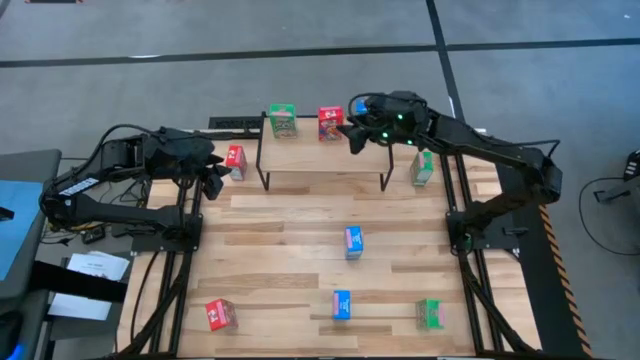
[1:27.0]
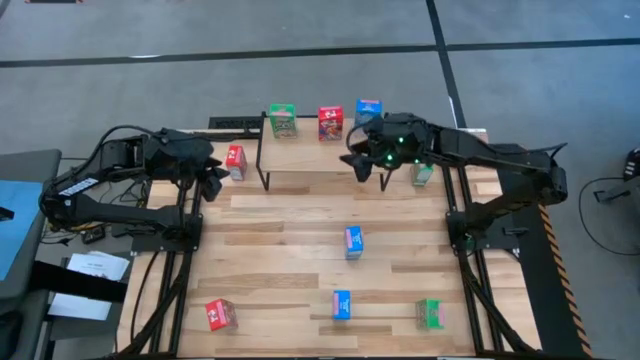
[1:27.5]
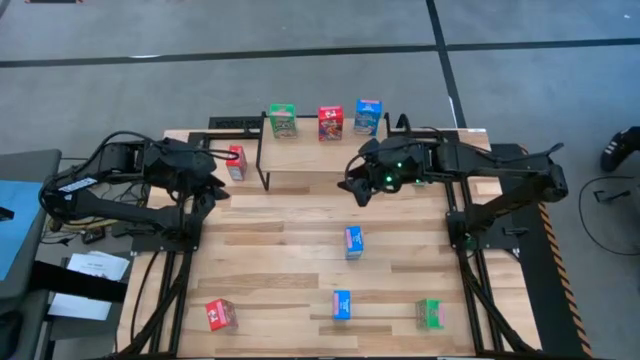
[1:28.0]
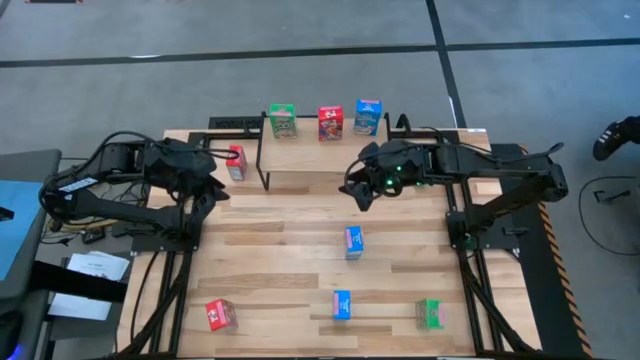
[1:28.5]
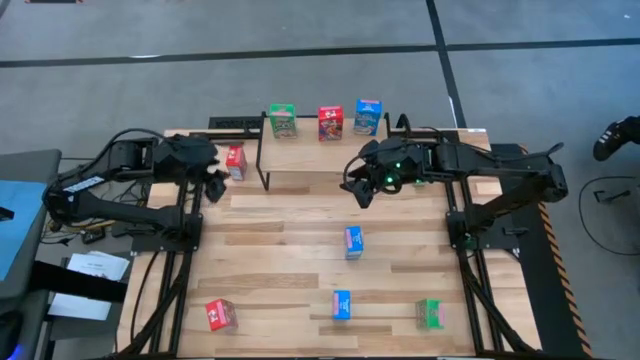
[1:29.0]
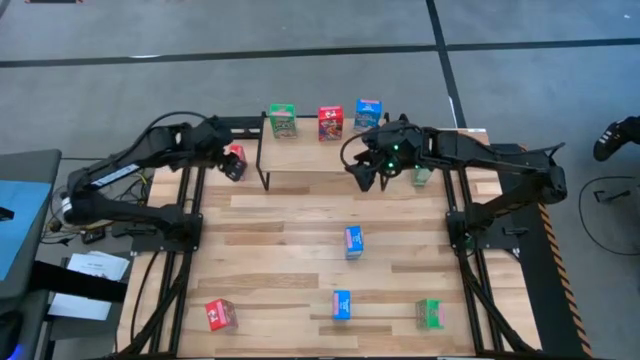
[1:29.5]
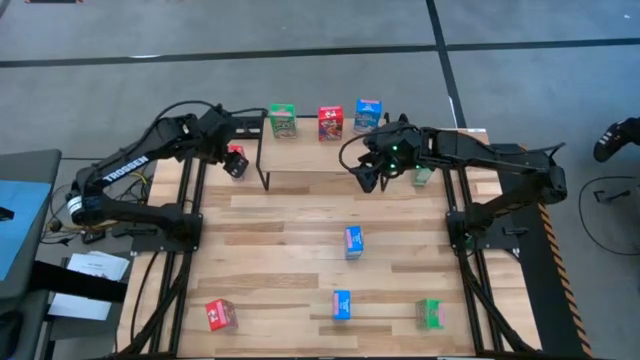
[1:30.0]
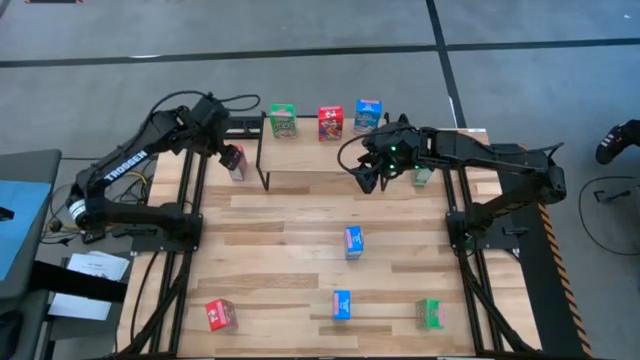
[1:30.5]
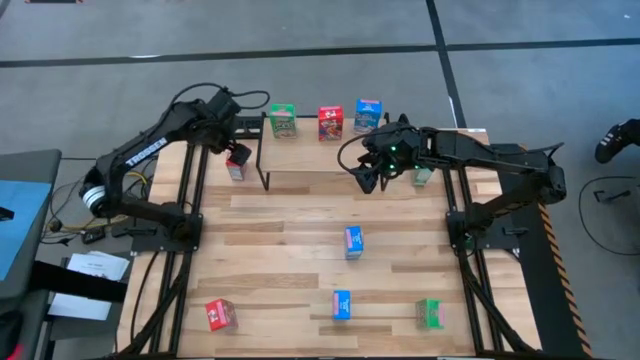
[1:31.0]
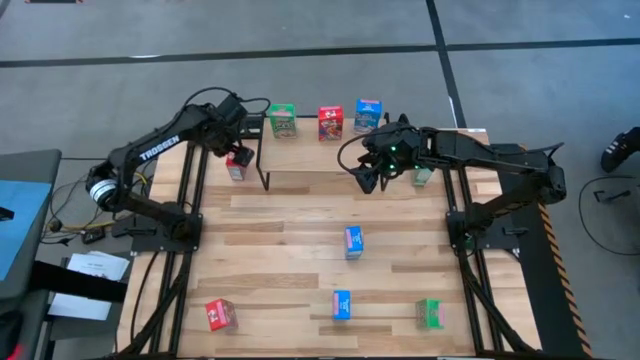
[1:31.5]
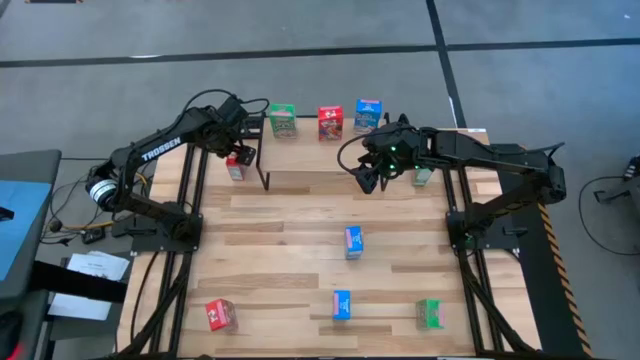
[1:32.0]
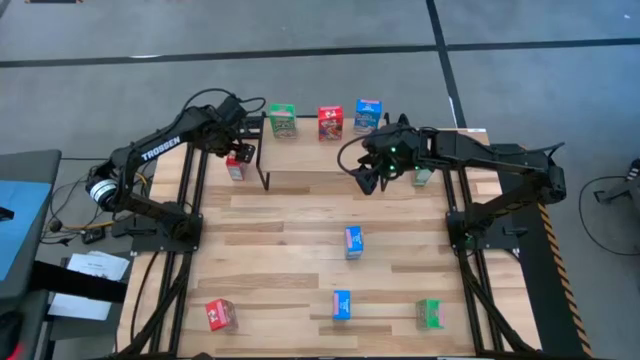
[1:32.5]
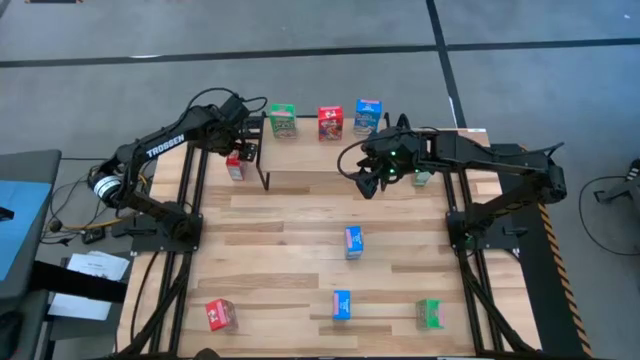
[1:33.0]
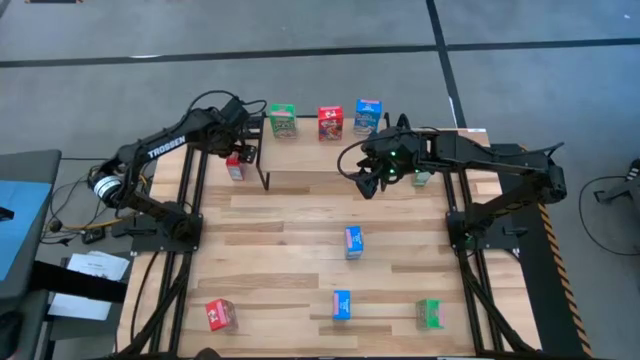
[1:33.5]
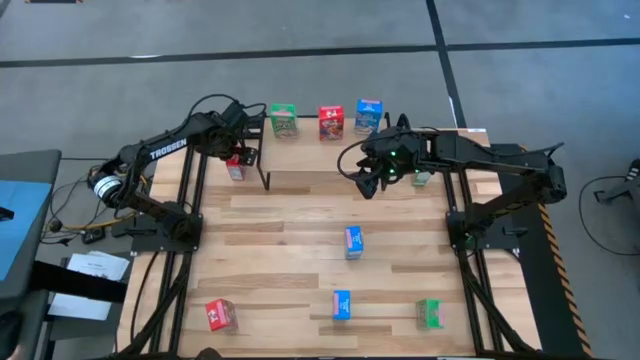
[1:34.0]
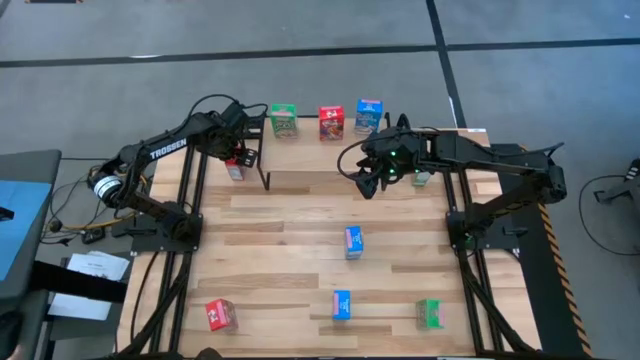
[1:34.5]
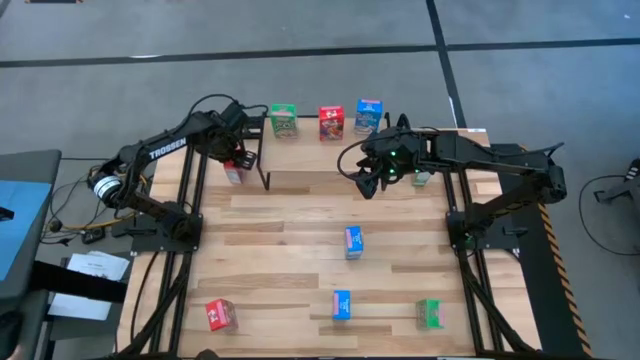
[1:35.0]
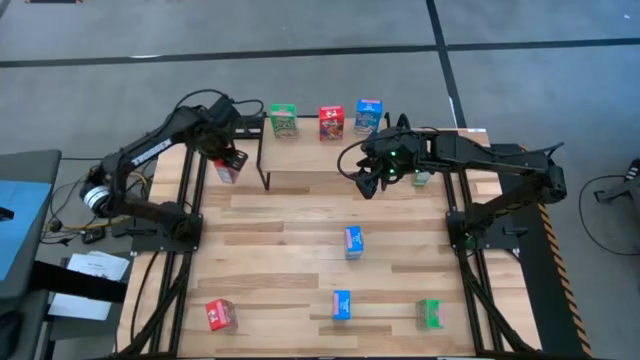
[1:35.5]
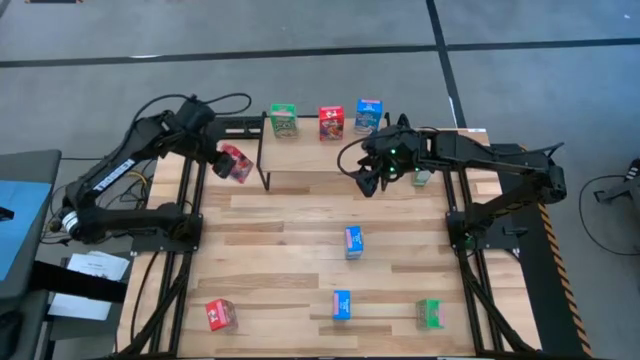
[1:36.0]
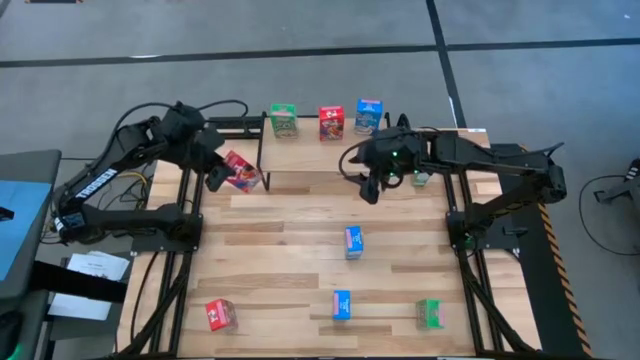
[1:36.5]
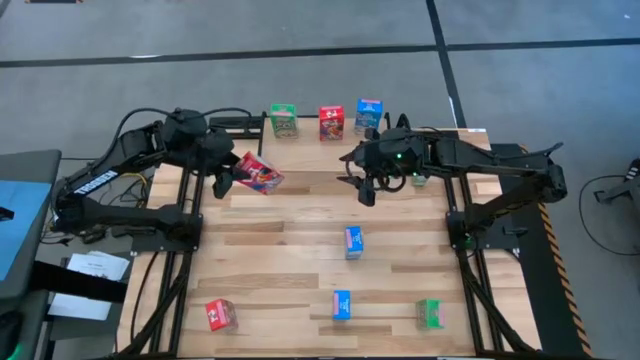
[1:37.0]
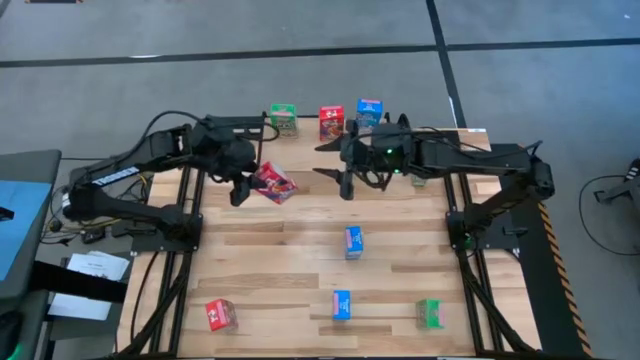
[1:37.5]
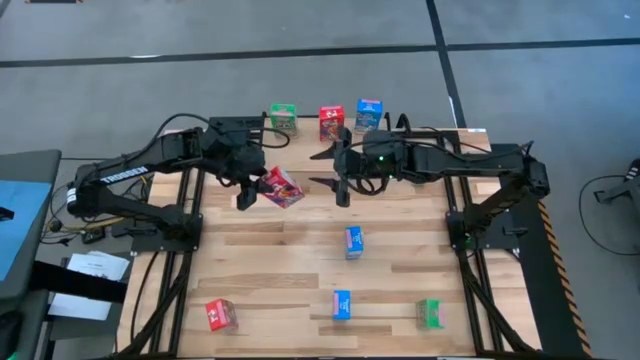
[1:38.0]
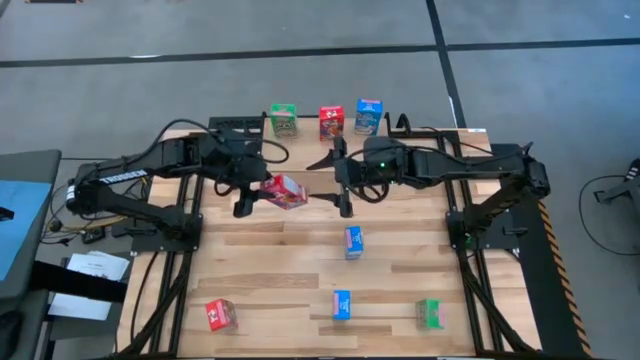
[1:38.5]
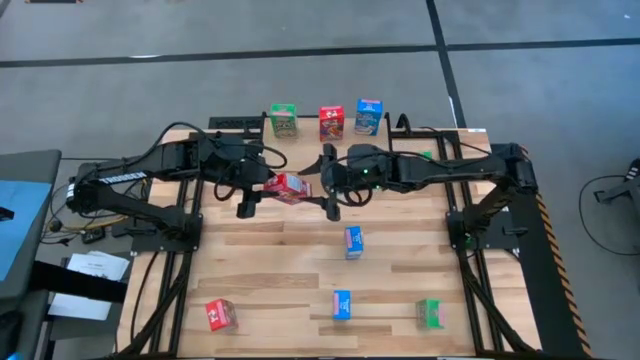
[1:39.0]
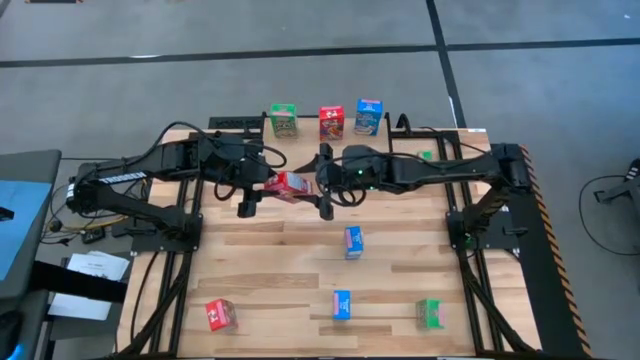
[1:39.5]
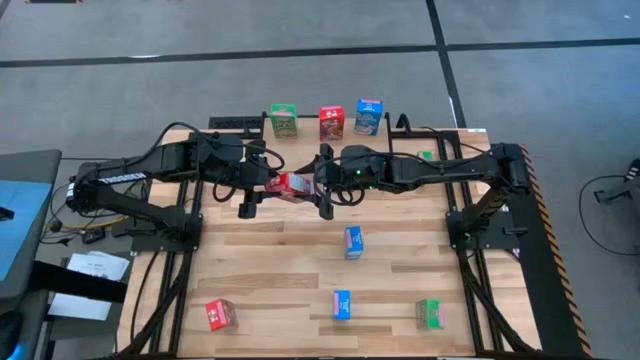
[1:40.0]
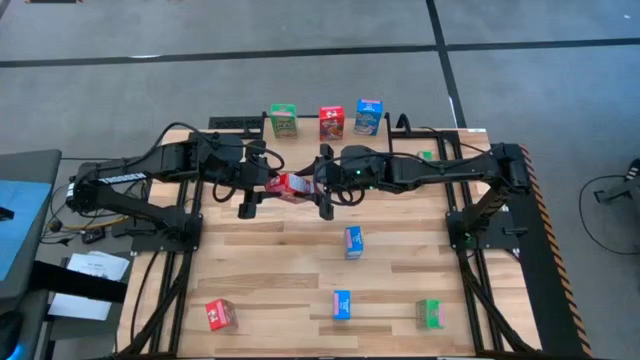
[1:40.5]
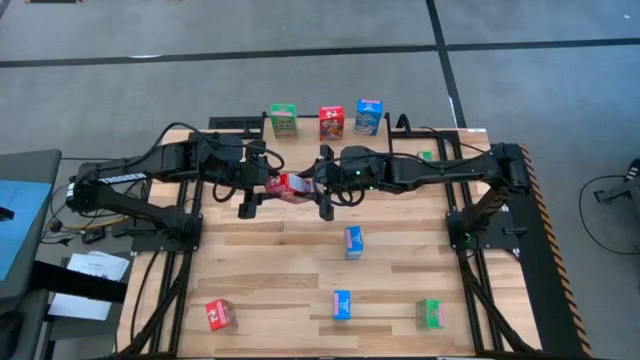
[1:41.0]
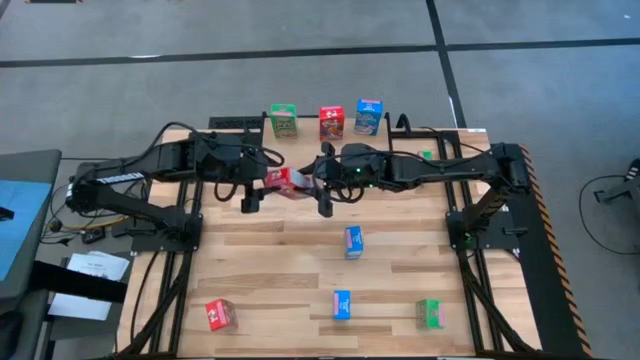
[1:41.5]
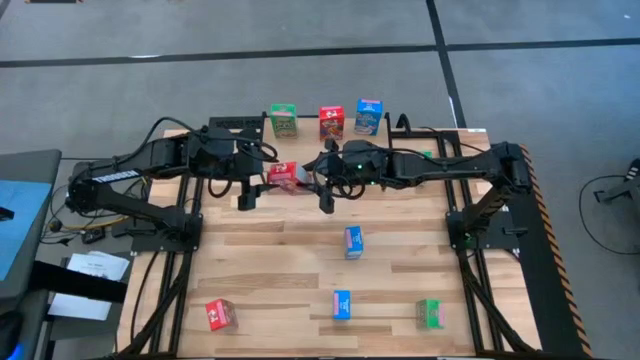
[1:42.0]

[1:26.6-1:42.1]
Task: Stack cereal on shelf
Put the top red cereal box on the shelf aligned with the other red cereal box
